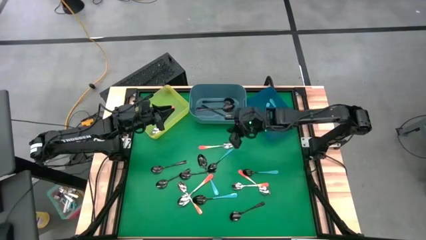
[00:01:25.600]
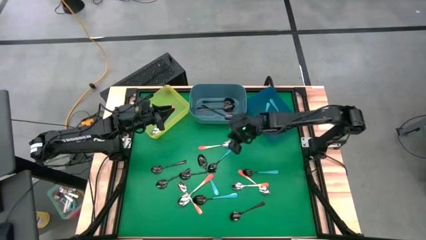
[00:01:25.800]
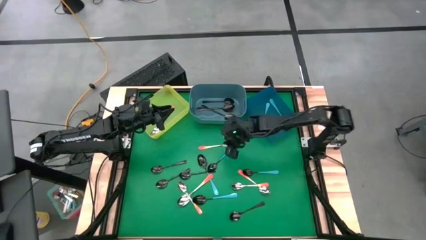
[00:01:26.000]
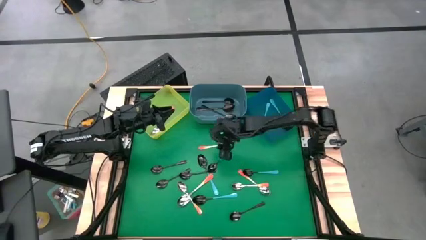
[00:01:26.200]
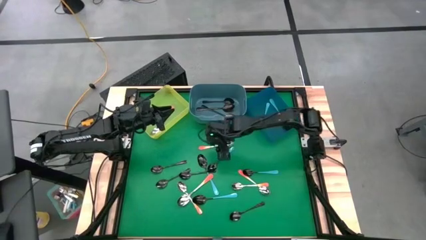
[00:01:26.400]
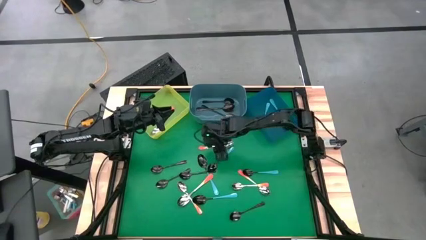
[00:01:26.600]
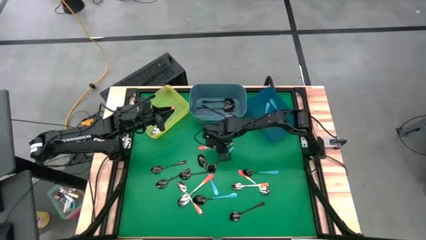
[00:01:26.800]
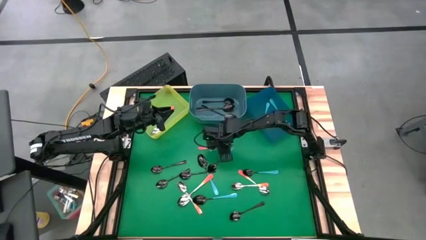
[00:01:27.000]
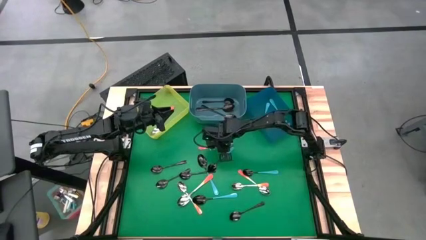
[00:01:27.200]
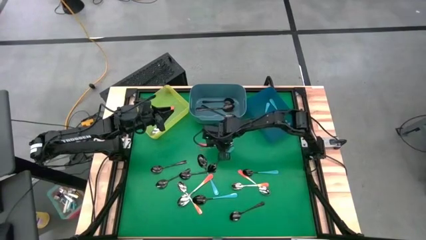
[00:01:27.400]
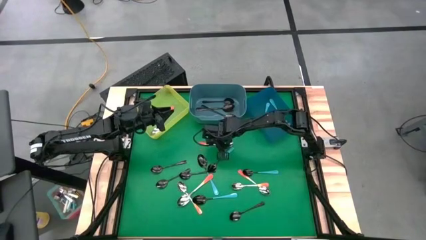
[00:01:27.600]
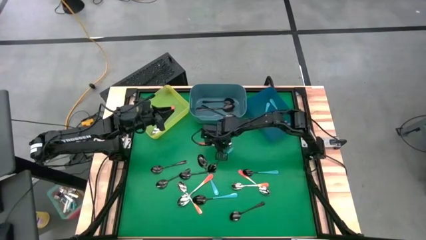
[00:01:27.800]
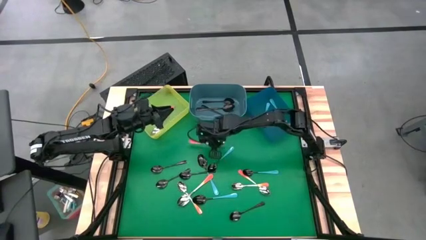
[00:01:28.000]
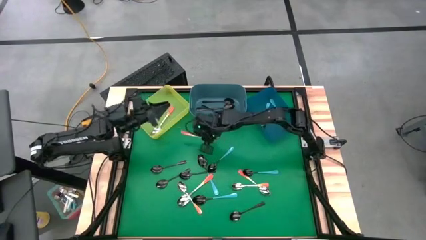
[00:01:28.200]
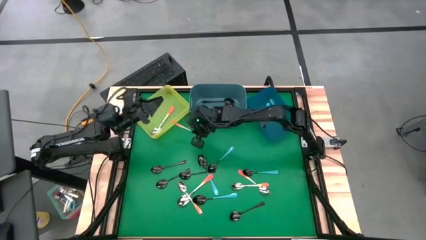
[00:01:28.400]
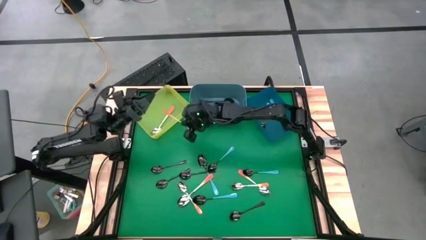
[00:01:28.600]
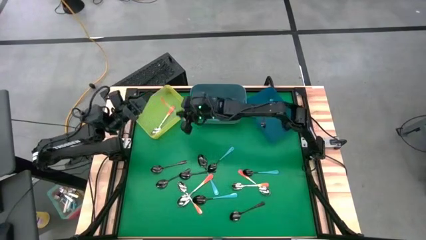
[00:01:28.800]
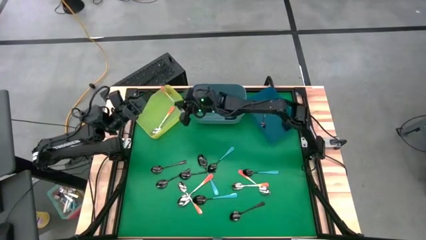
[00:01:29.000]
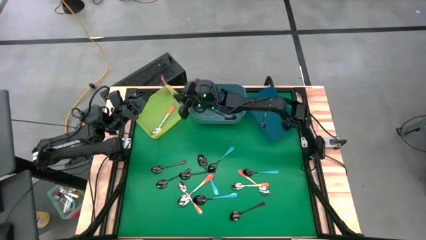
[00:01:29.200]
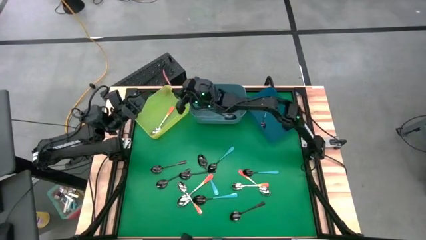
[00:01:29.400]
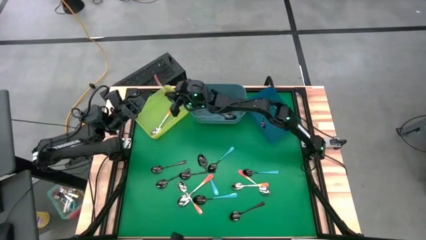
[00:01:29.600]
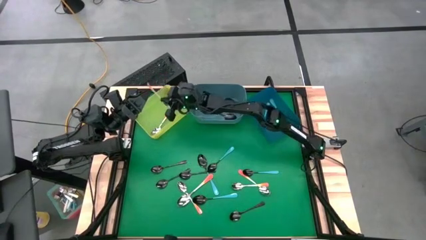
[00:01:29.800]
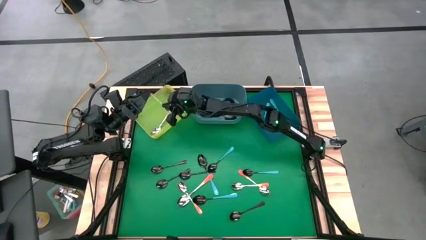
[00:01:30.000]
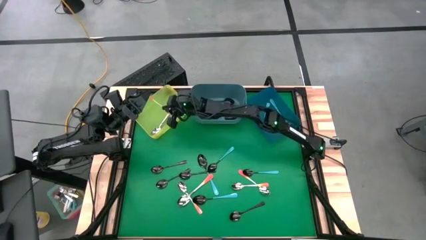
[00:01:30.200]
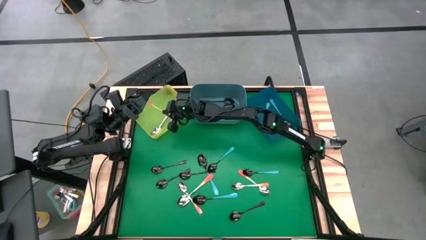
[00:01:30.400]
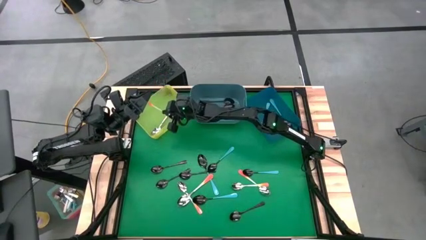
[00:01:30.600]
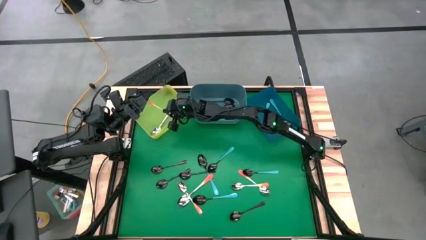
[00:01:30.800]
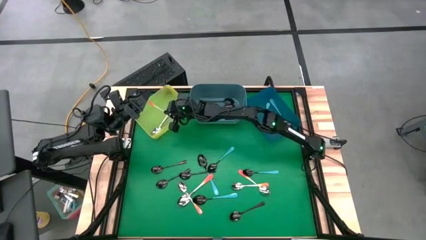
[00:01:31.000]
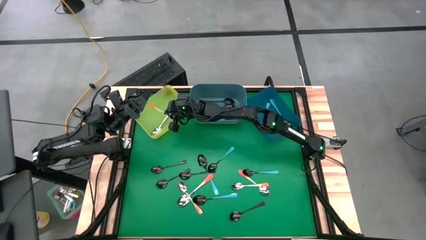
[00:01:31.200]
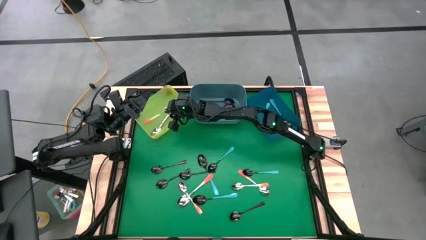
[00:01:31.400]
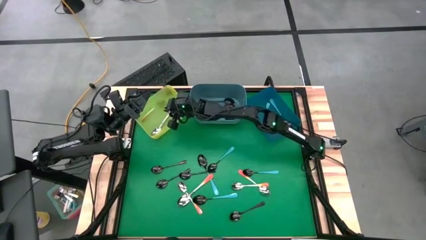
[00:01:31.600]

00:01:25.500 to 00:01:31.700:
Task: Sort silverware by color (type)
Put the orange spoon into the yellow bin

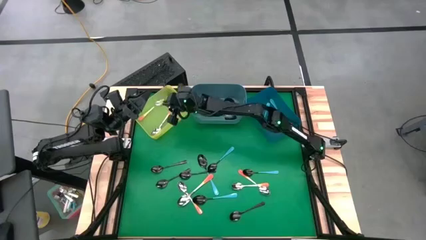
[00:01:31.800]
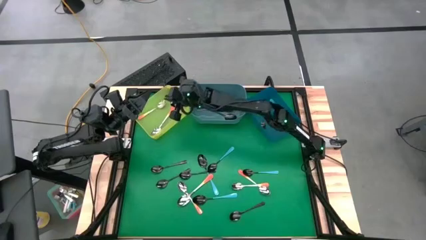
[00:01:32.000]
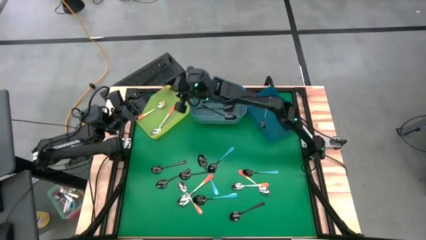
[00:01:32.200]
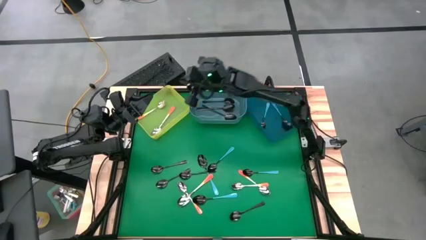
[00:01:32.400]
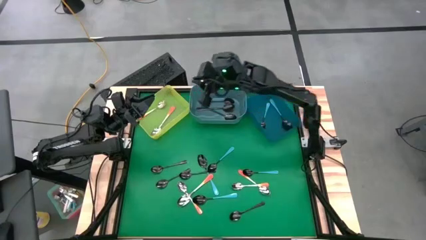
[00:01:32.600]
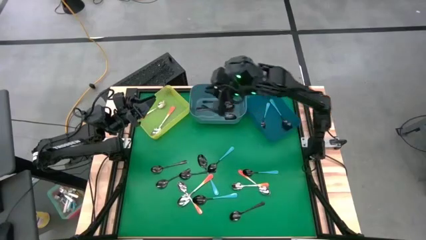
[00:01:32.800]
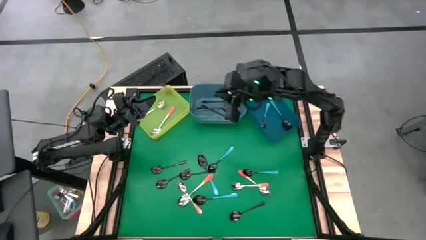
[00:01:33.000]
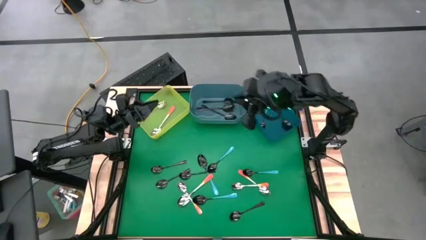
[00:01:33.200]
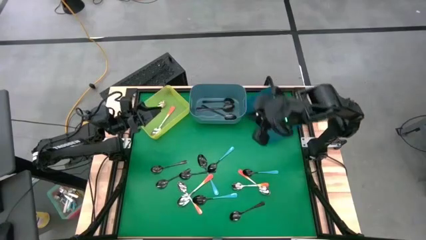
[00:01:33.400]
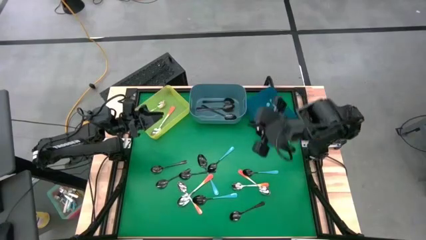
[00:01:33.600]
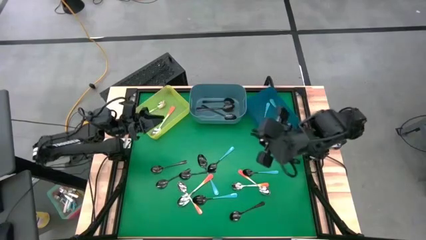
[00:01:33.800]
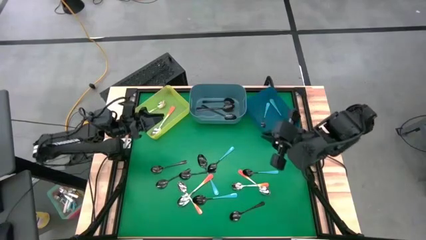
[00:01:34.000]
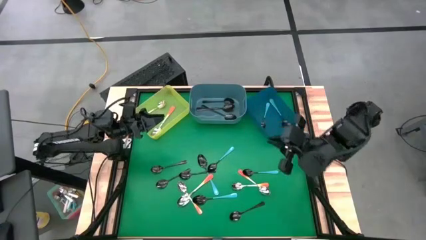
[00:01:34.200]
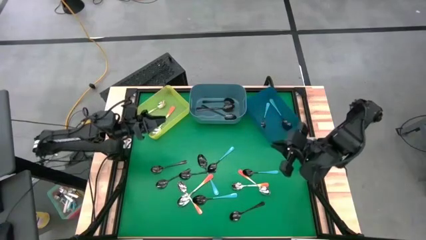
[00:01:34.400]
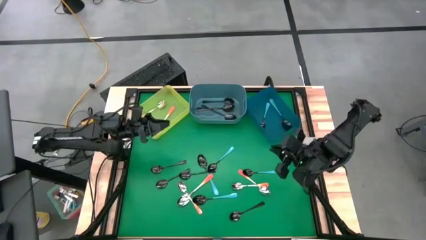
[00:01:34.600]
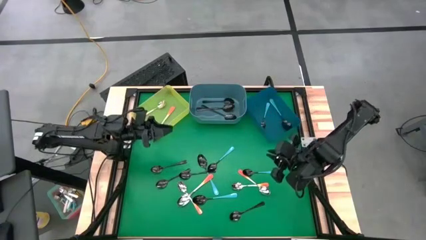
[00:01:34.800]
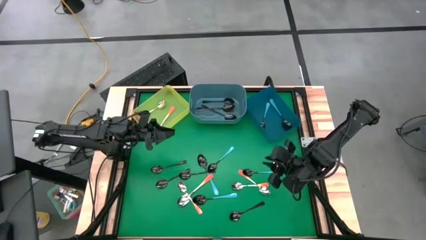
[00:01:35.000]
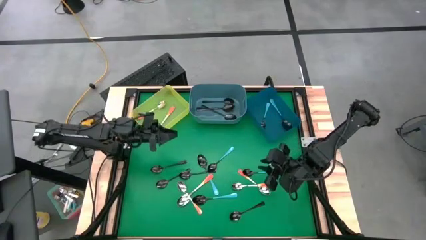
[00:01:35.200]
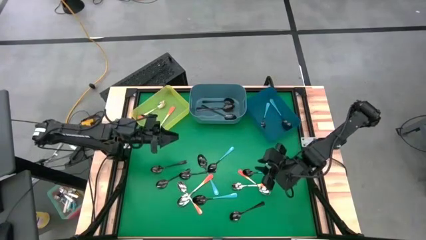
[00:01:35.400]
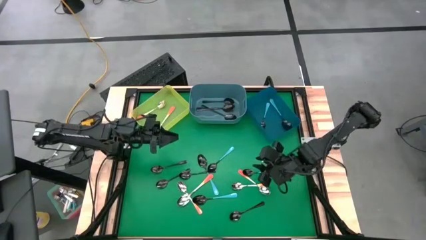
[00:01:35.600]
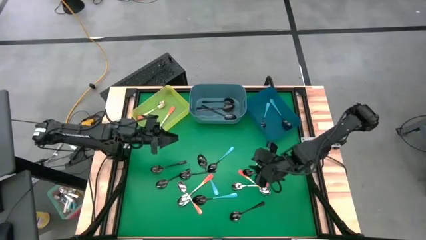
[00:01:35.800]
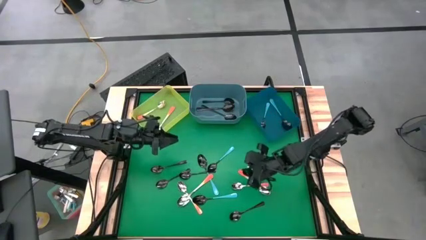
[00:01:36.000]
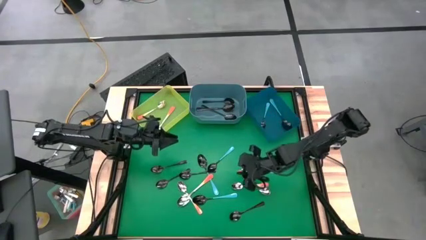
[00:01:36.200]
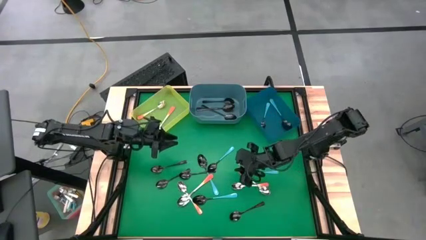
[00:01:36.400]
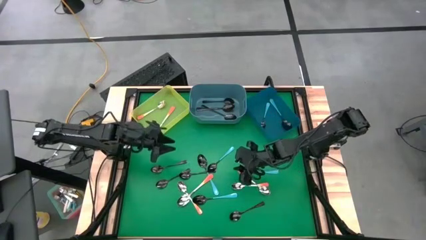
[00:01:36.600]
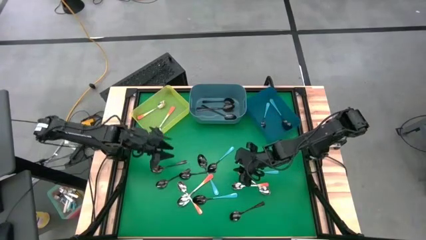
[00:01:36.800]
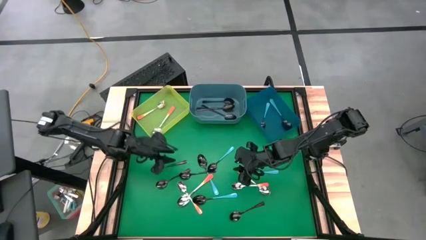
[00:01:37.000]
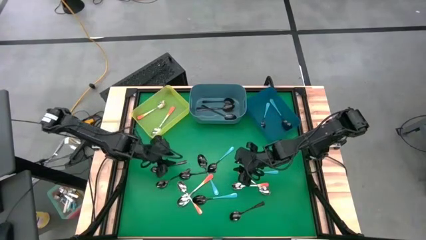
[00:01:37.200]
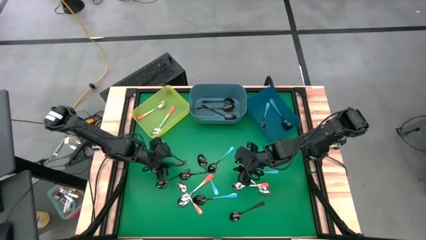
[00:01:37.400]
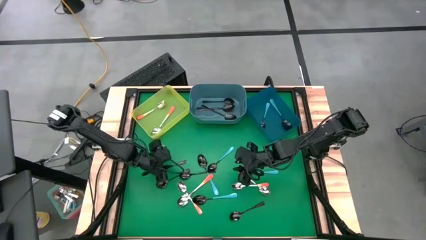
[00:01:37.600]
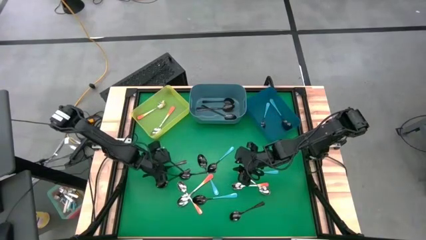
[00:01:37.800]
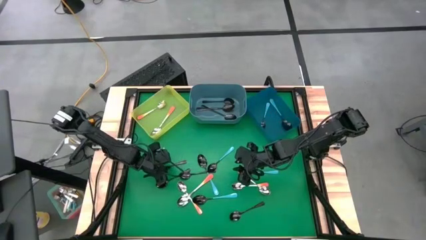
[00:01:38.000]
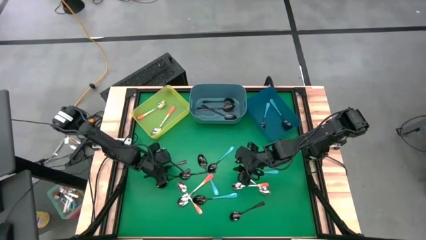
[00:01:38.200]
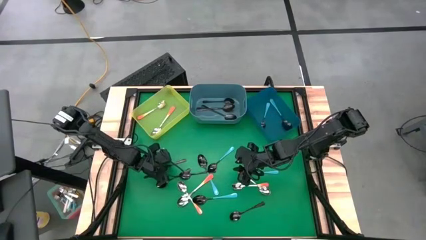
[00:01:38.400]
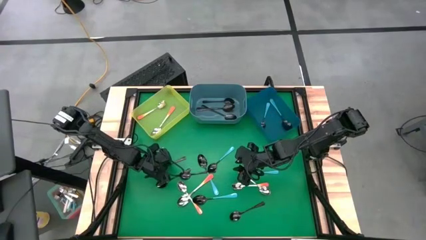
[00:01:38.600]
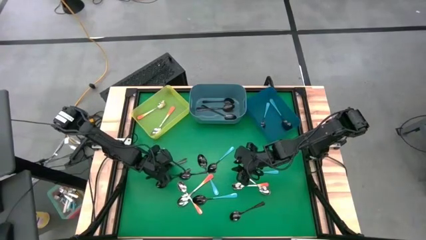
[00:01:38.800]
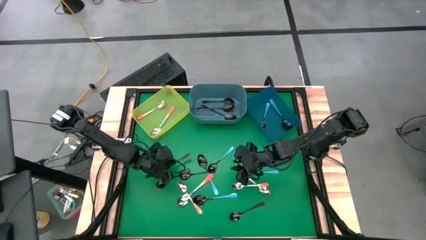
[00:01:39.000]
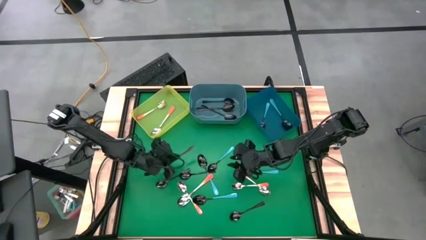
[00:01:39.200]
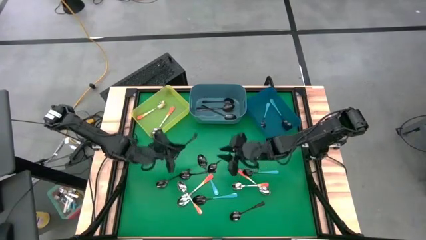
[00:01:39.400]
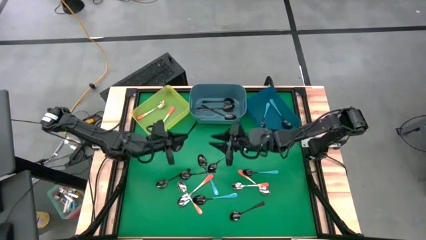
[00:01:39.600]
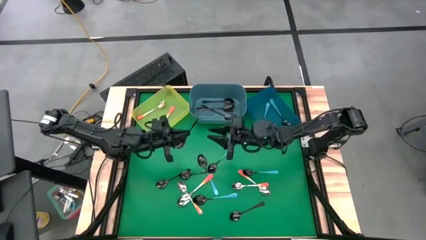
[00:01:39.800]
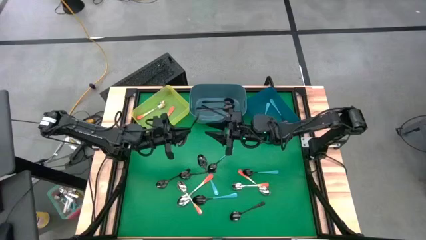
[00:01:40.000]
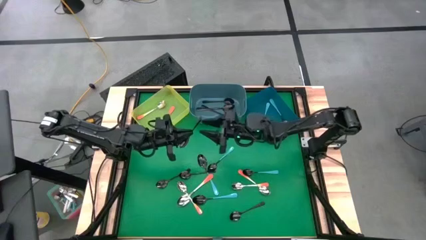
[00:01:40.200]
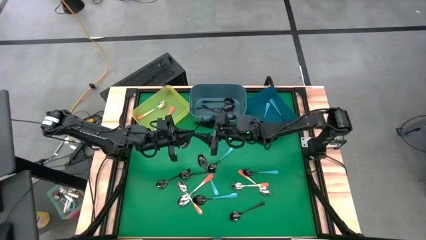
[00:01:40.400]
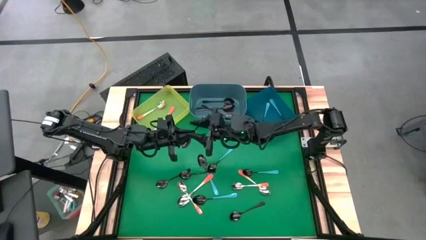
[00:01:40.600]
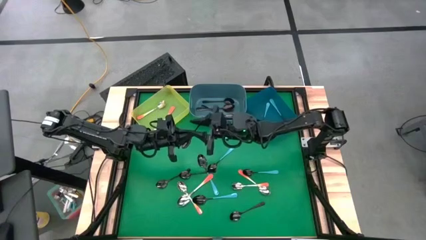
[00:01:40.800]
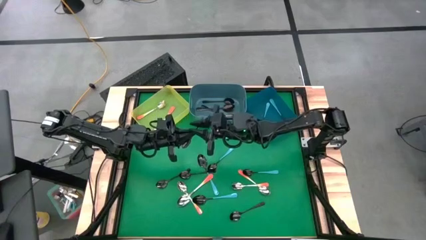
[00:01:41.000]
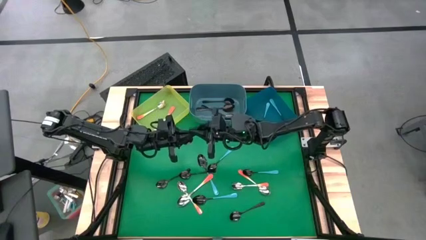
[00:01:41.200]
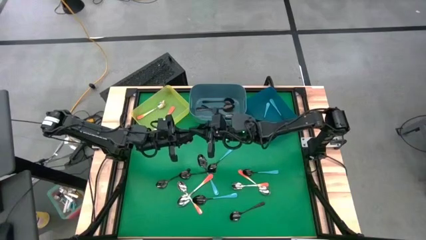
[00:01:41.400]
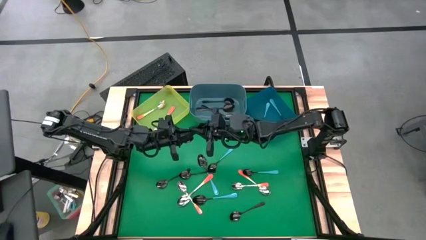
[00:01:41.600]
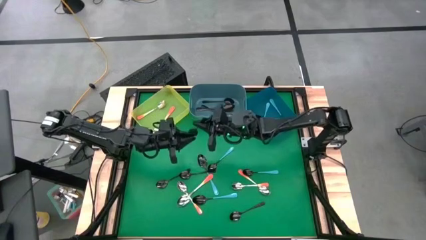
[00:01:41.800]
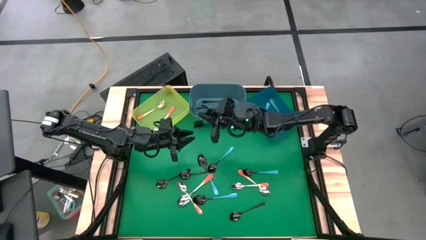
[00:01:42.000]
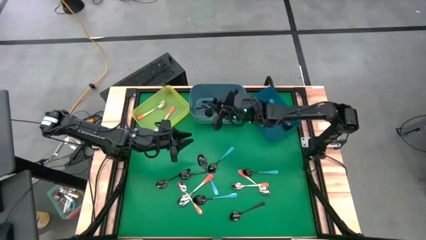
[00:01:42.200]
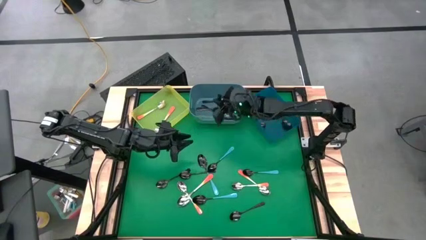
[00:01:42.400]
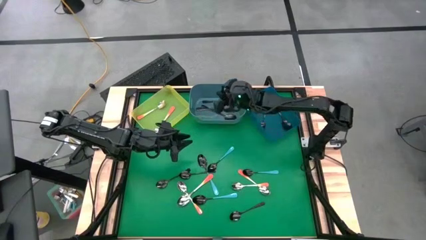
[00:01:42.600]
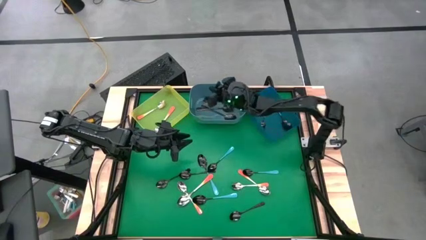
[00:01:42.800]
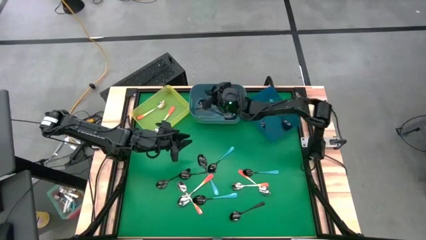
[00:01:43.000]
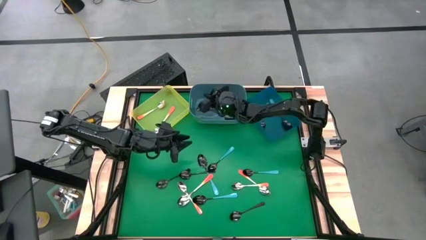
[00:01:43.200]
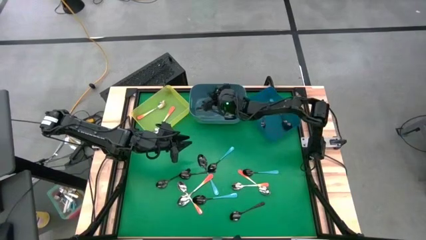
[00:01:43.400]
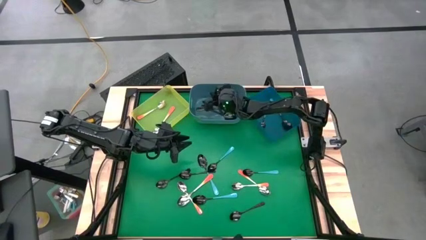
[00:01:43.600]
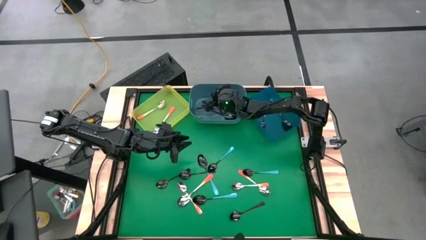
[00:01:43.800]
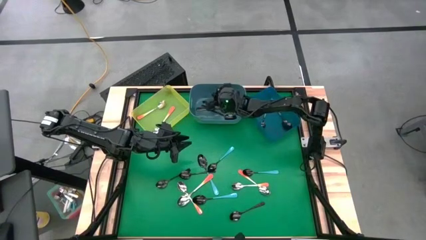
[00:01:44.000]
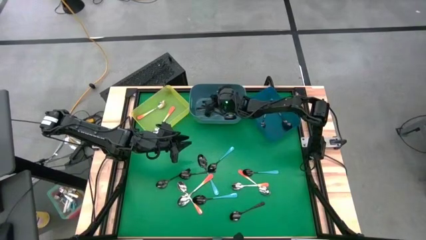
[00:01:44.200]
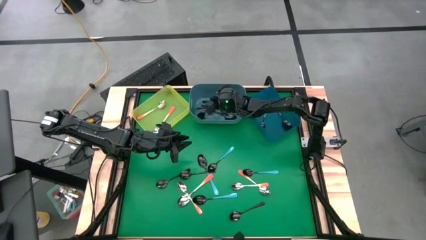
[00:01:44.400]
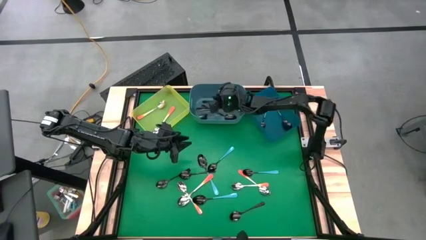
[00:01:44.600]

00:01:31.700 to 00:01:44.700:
Put the black spoon into the light blue bin
